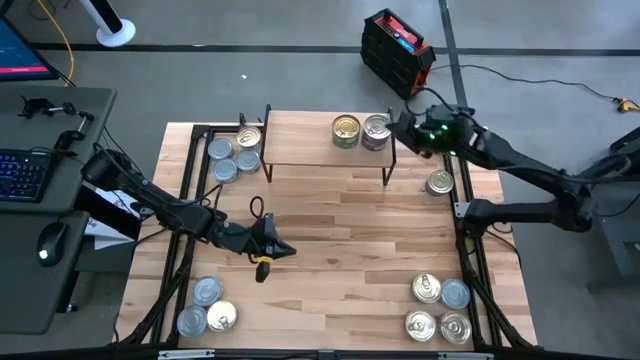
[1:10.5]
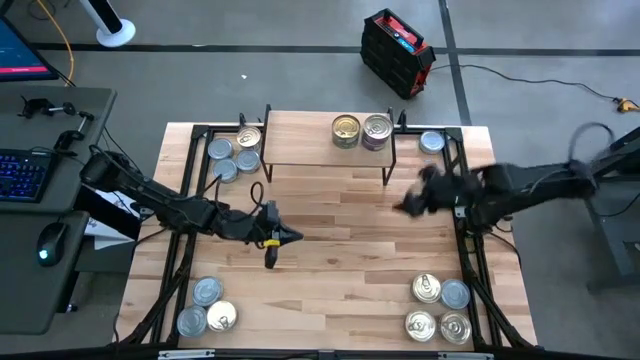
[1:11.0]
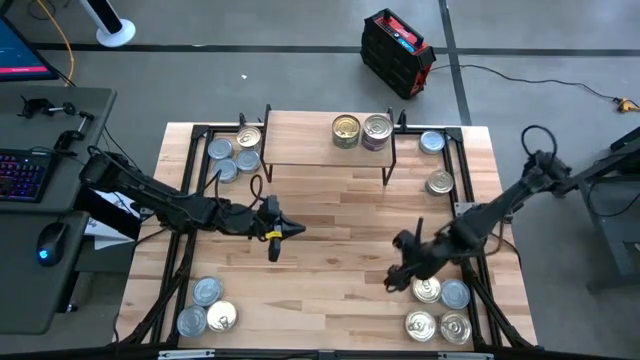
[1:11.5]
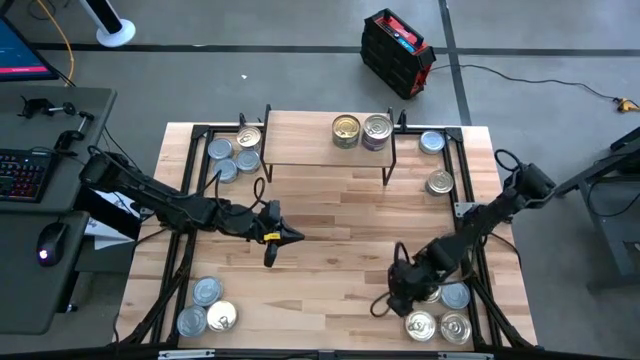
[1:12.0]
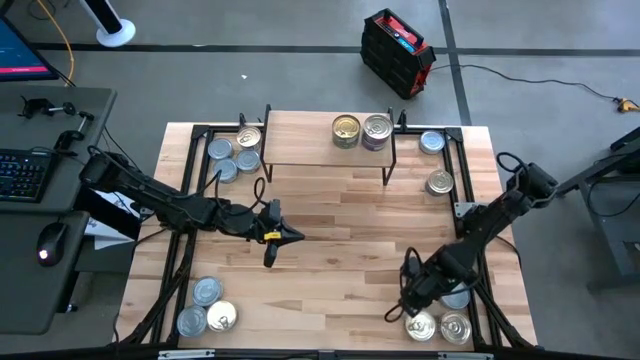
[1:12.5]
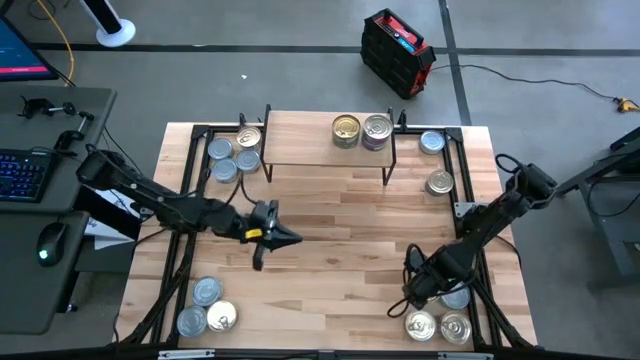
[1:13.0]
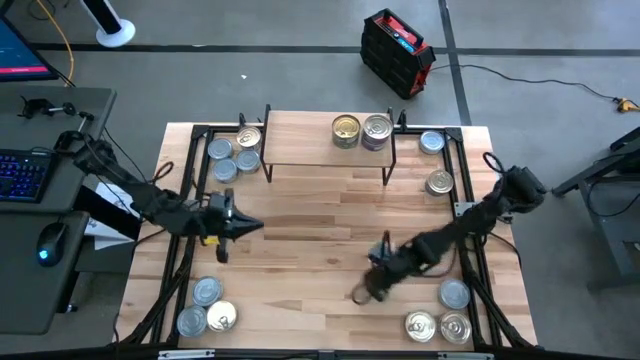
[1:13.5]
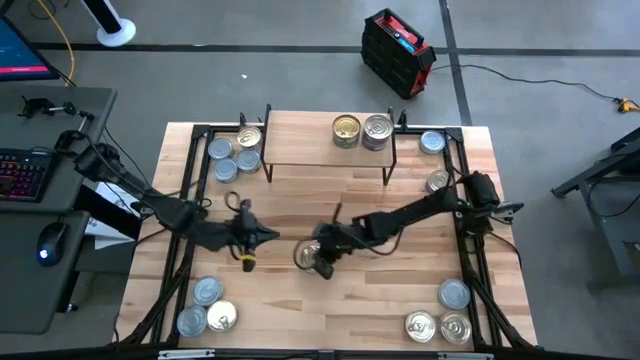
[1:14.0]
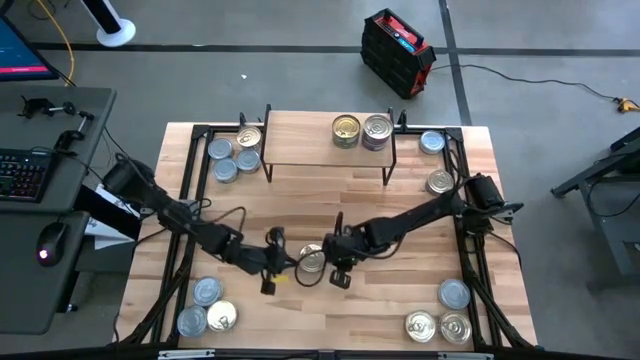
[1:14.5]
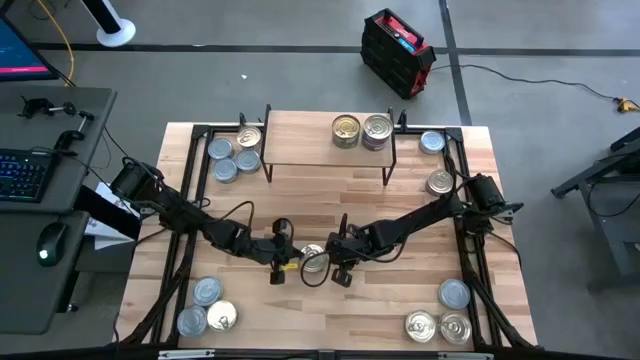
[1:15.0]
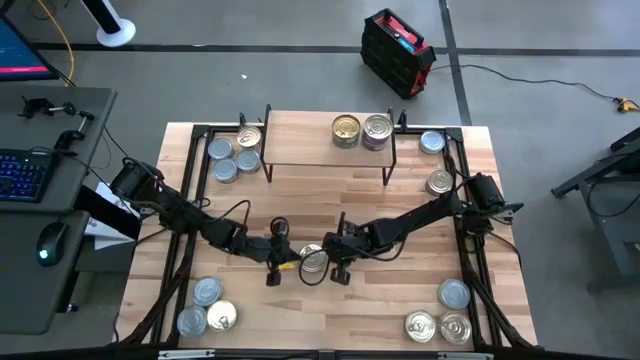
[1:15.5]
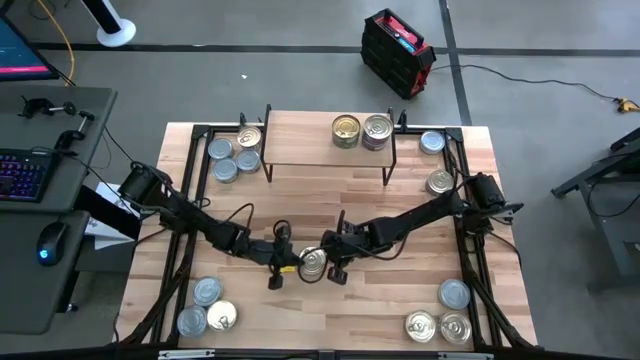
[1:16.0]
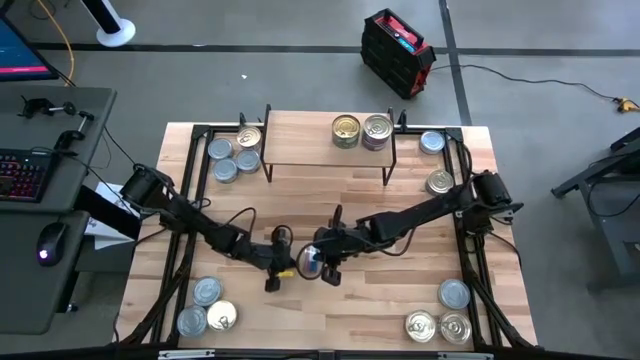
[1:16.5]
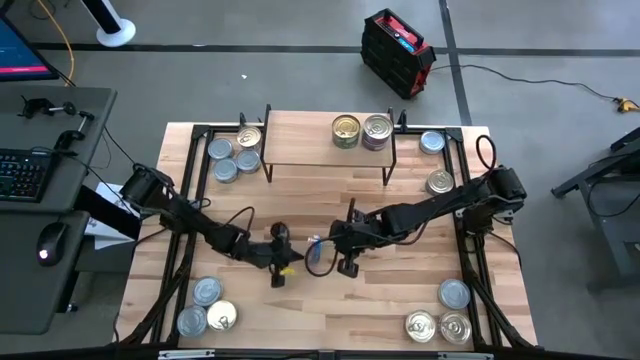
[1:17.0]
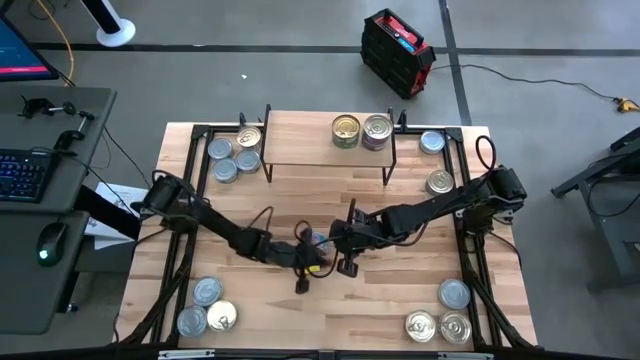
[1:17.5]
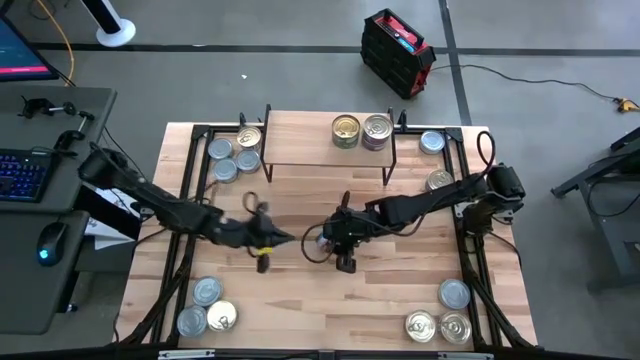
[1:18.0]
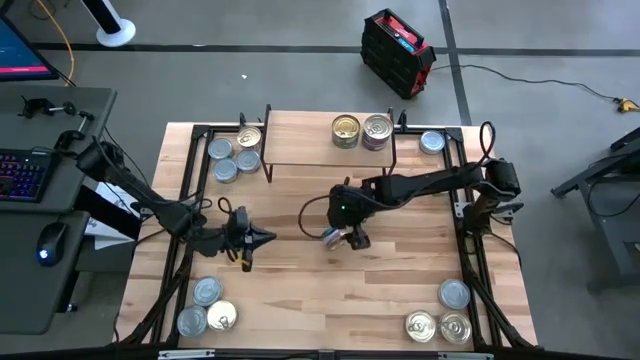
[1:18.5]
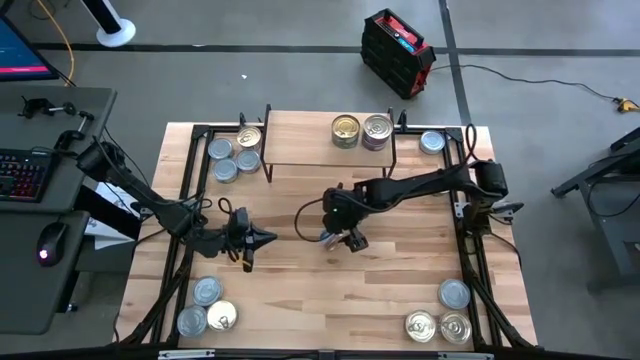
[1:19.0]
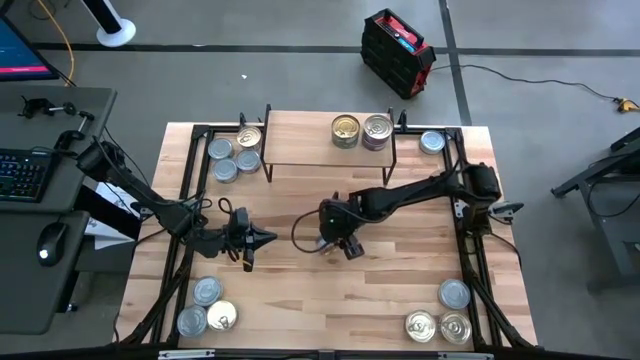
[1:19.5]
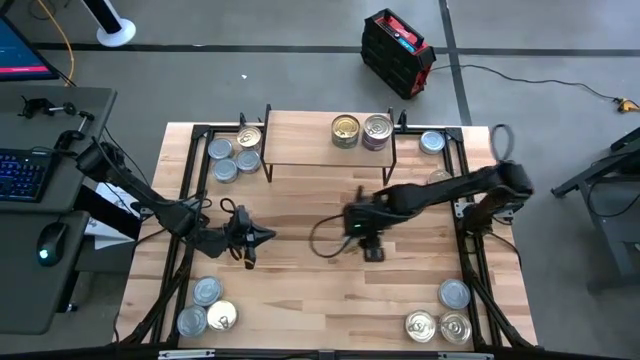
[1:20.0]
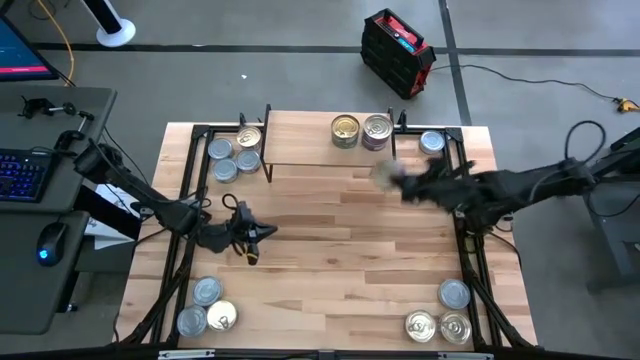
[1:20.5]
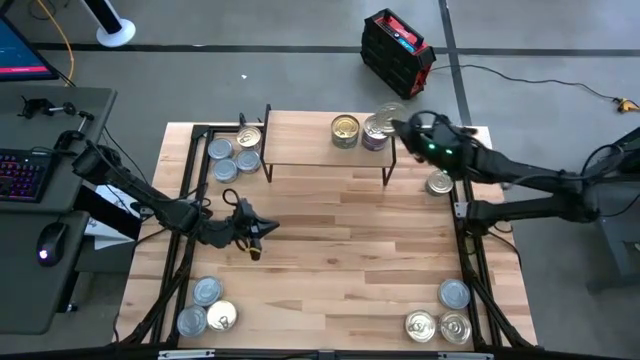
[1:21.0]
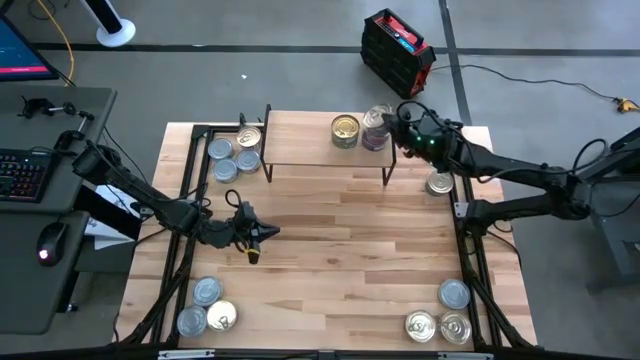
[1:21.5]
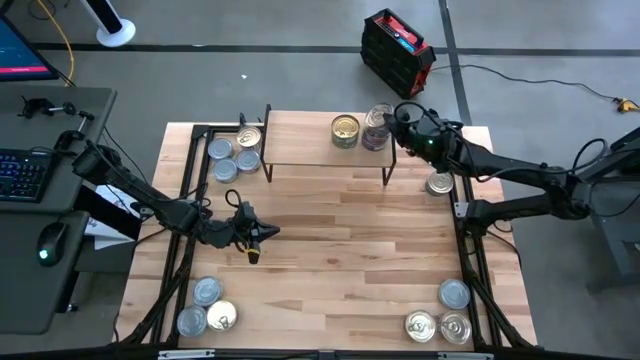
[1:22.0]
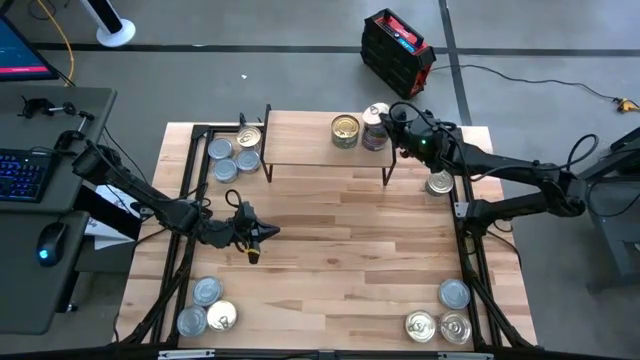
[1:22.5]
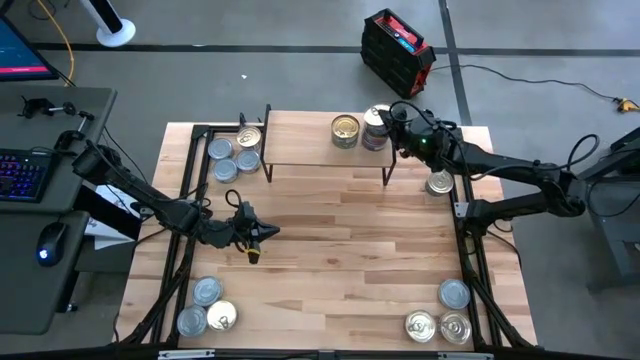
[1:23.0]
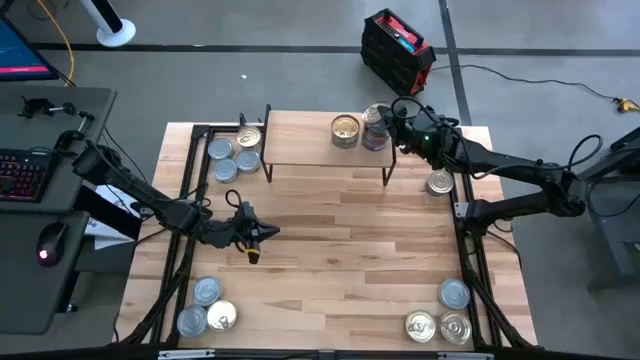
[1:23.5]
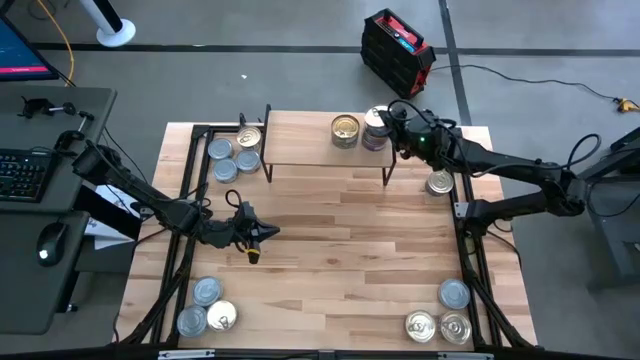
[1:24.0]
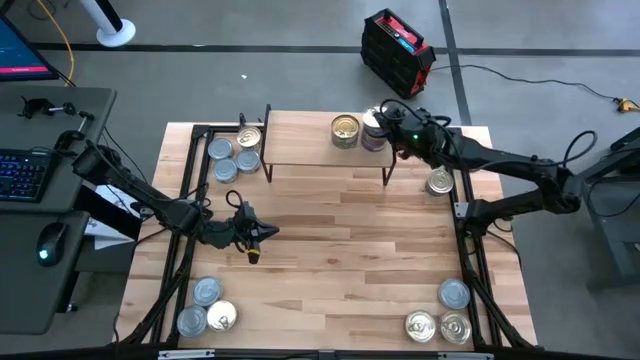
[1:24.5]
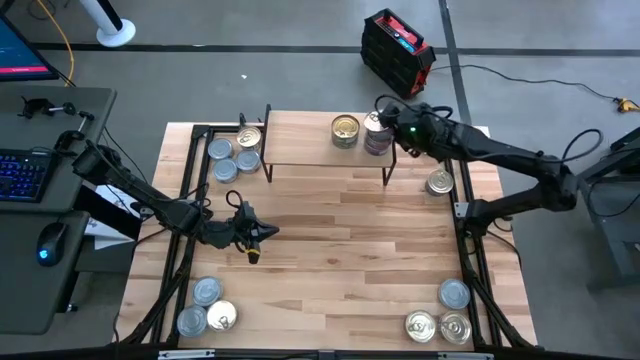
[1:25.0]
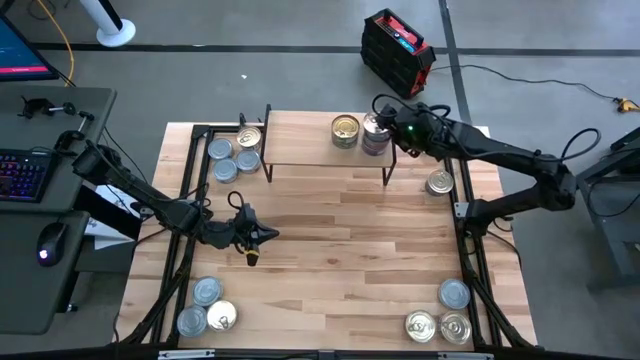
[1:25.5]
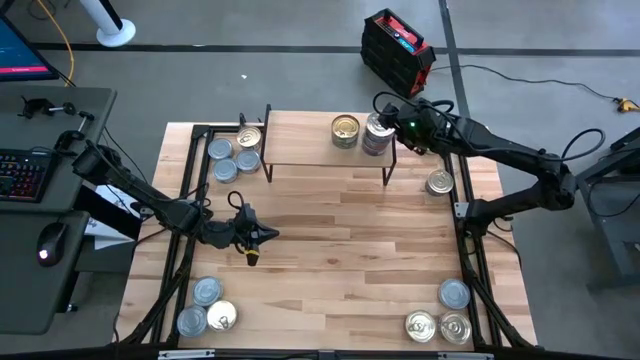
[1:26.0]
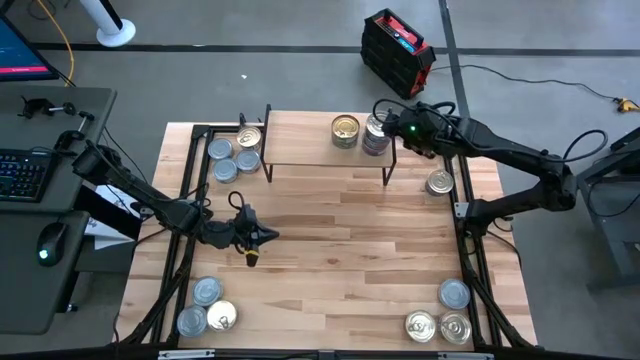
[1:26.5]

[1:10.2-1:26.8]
Task: Stack canned seafood by type on shelf
Stack the blue pink tuna can on top of the other blue pink tuna can on the shelf

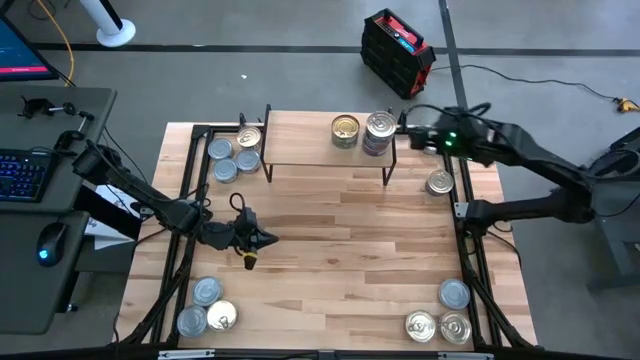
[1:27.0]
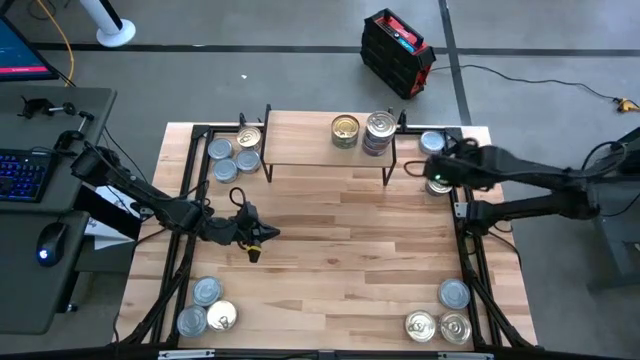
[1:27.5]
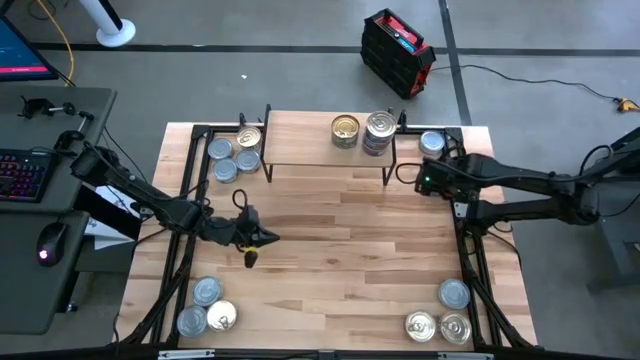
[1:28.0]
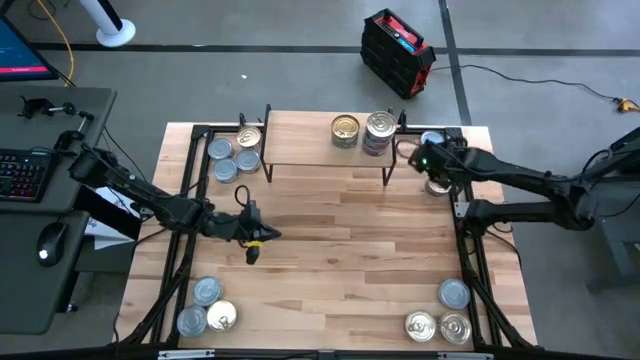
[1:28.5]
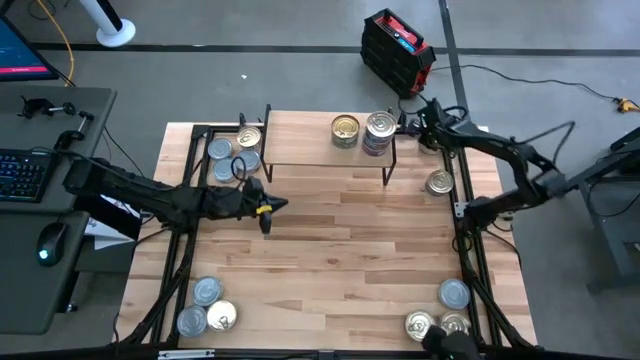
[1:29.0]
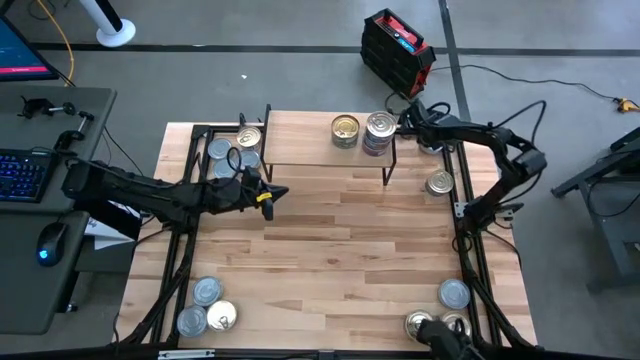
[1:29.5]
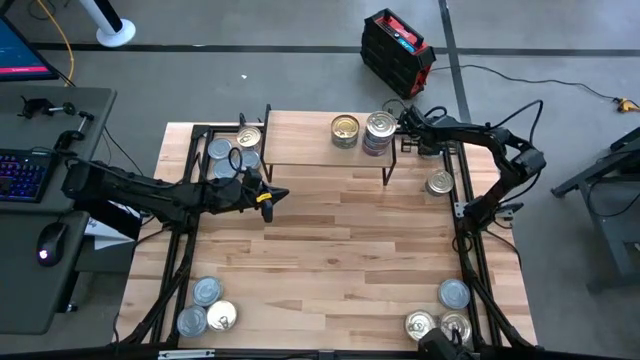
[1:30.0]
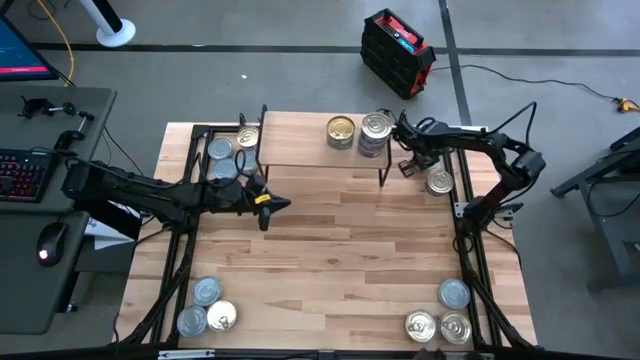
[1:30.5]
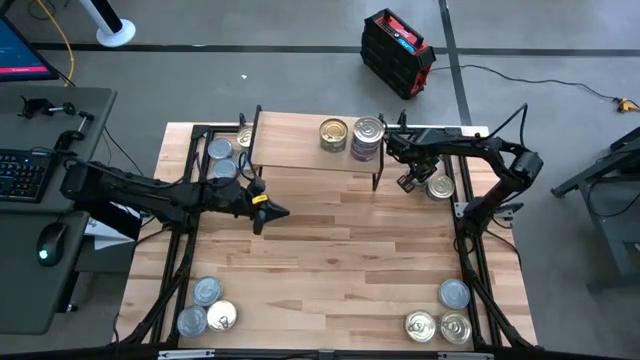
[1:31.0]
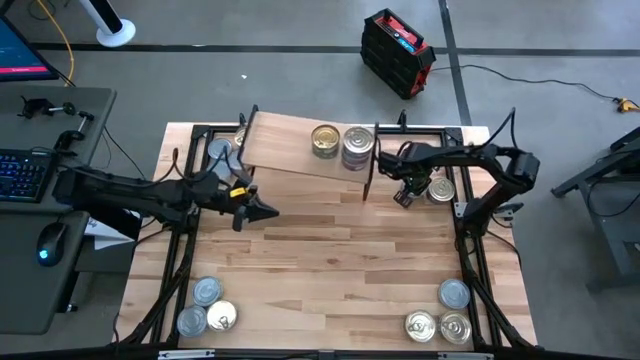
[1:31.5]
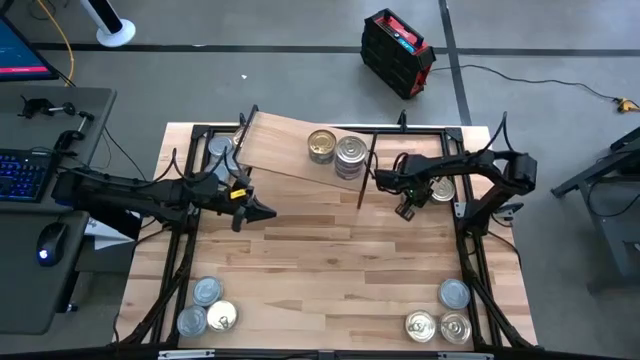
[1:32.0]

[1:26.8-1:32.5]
Put the green white tuna on the shelf
